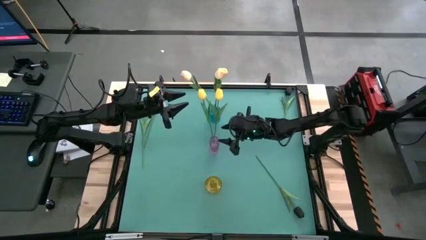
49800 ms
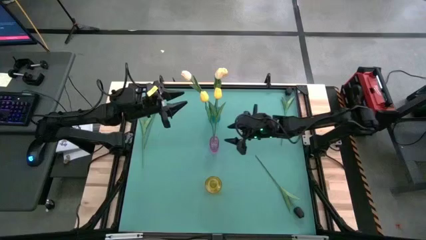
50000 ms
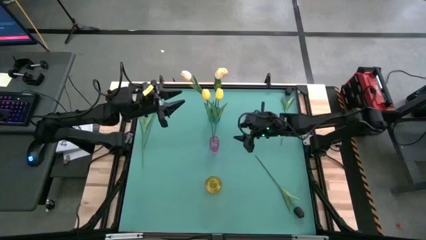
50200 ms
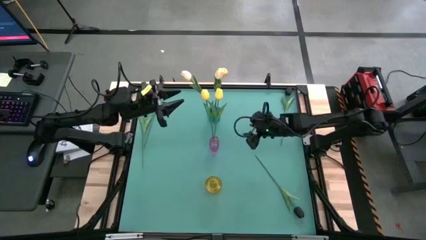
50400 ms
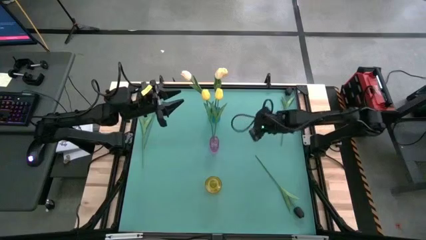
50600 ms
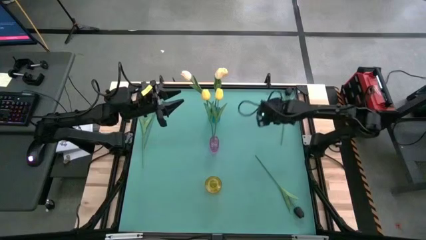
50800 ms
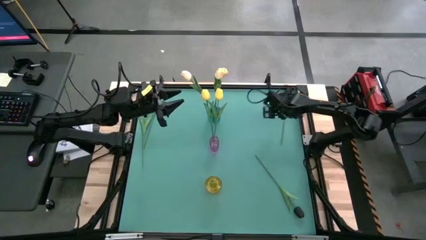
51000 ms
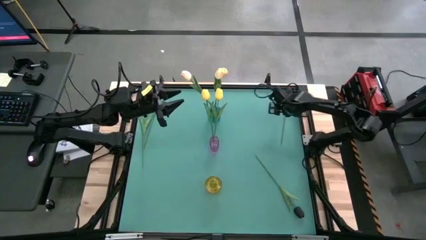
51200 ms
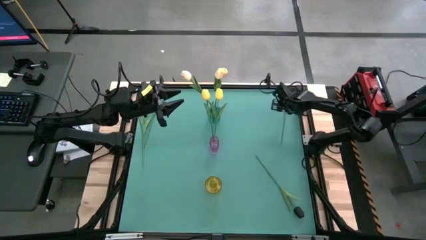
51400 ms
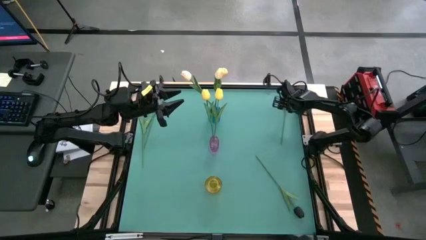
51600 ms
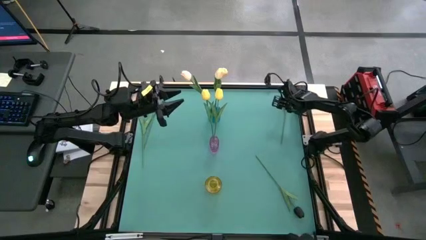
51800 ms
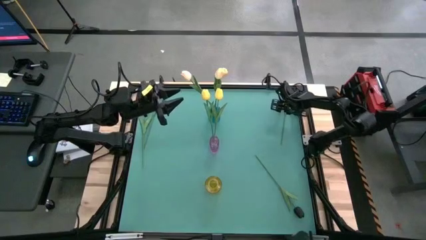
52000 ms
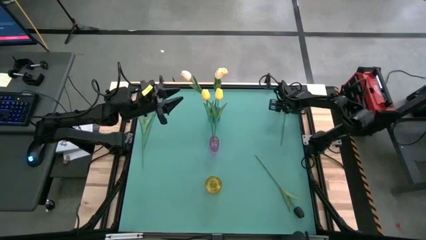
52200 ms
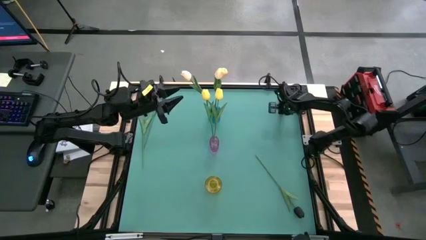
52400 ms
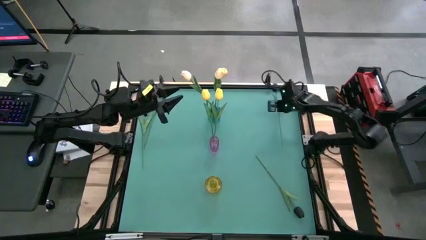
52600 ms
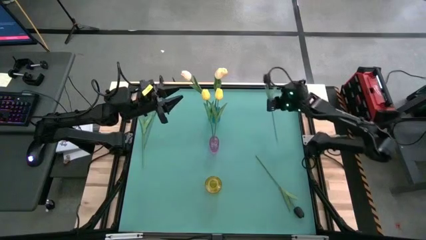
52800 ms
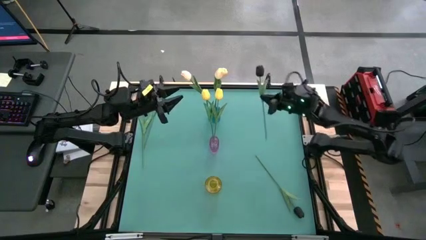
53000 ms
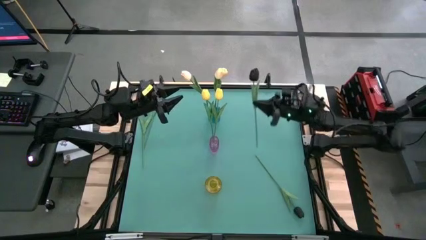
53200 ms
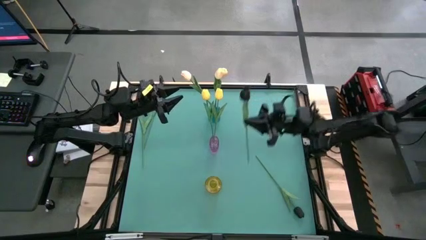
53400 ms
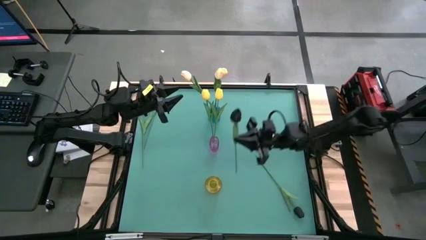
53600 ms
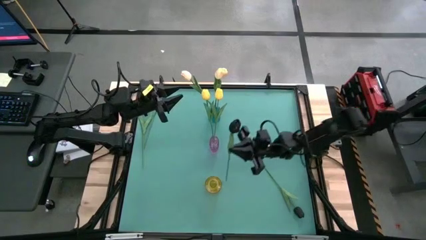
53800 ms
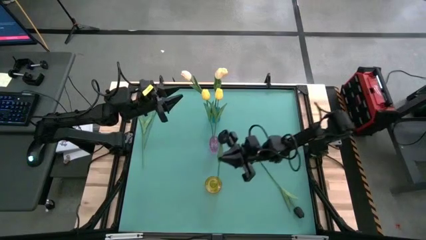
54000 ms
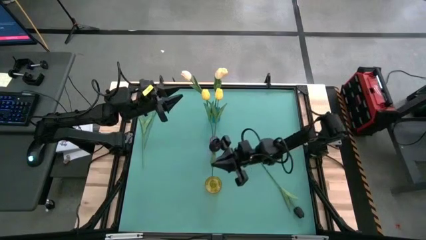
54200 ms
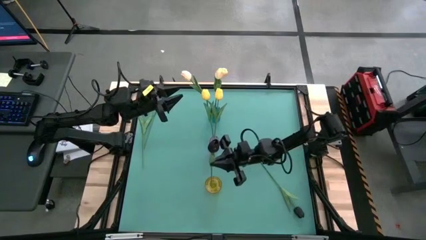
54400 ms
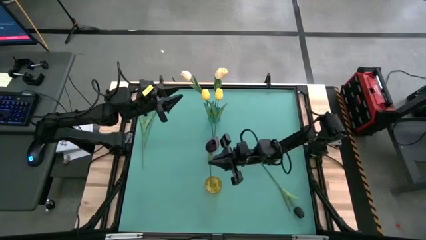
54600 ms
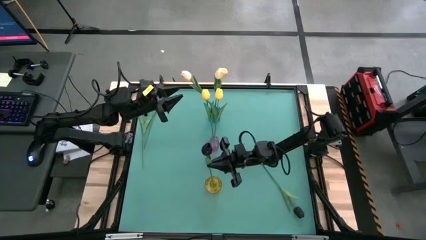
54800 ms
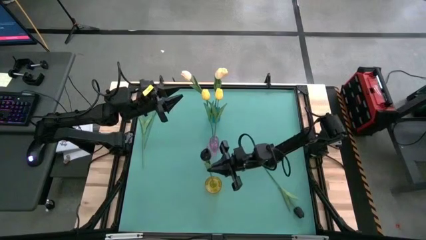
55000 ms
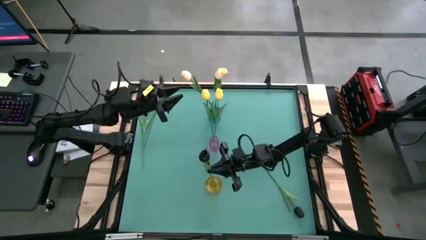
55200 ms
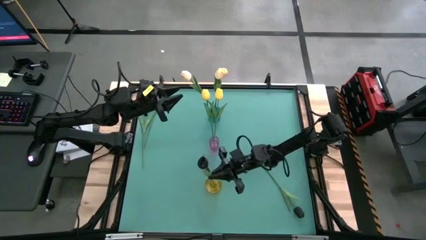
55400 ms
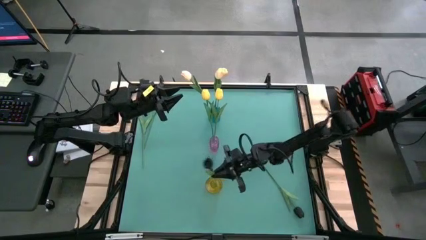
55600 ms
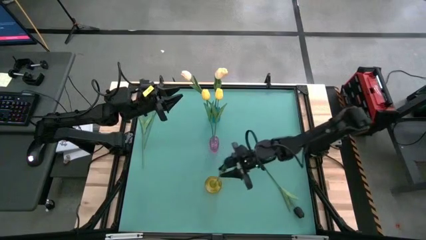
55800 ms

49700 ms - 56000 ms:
Task: Sort flowers into vase by color
Put the top right black flower into the yellow vase

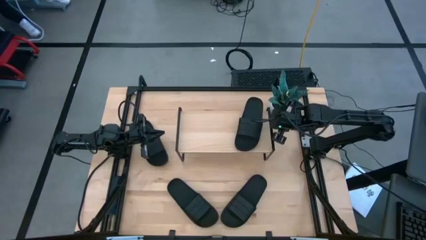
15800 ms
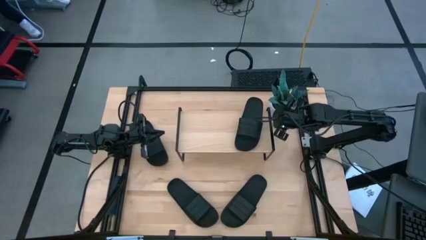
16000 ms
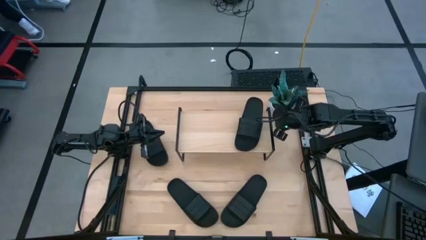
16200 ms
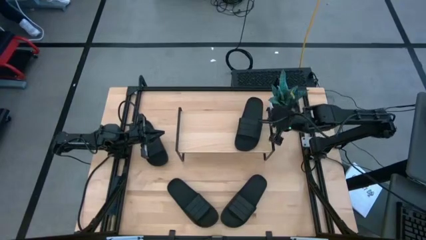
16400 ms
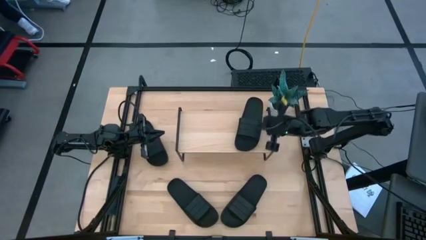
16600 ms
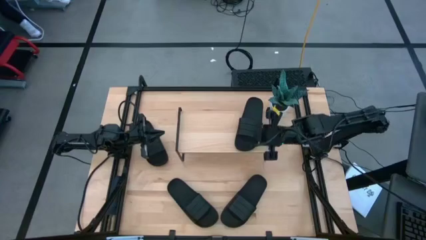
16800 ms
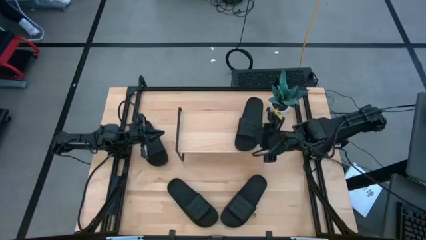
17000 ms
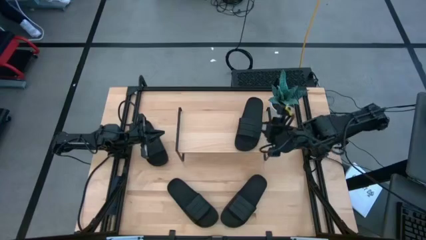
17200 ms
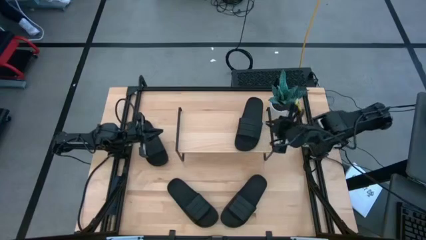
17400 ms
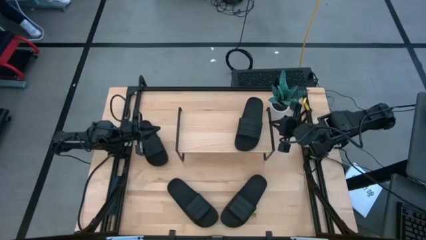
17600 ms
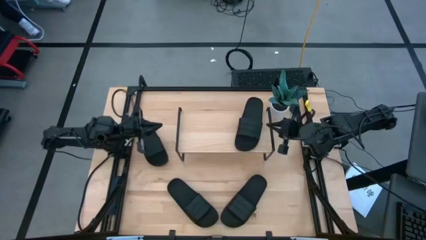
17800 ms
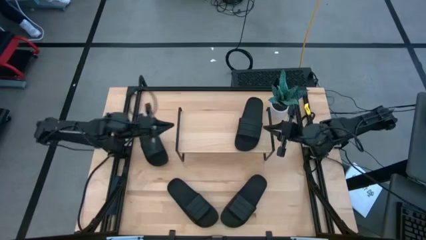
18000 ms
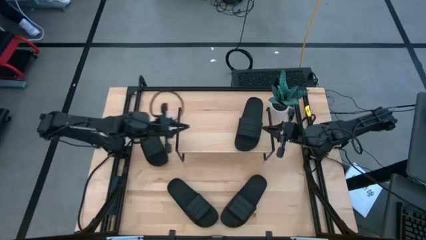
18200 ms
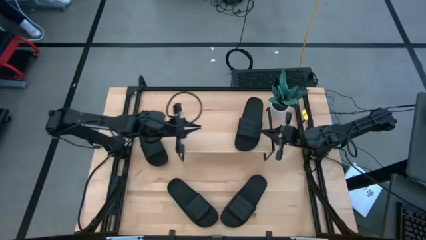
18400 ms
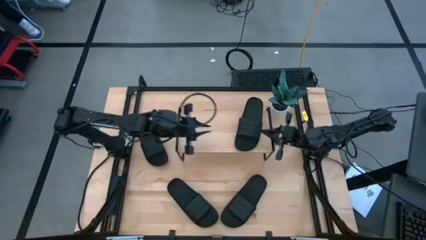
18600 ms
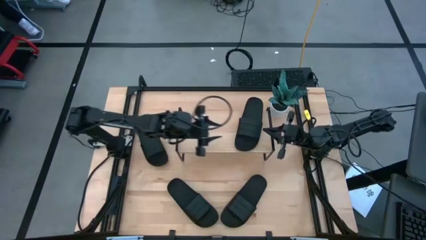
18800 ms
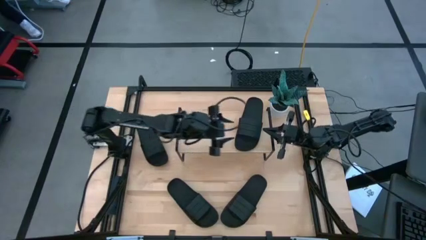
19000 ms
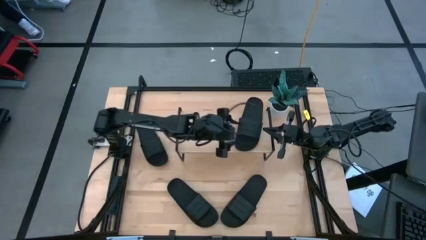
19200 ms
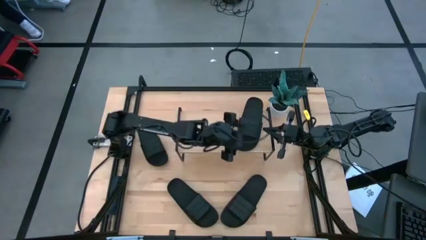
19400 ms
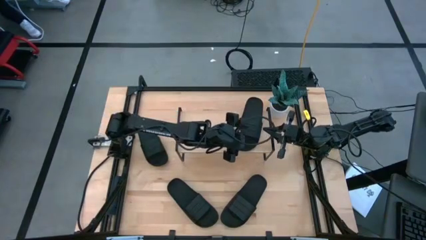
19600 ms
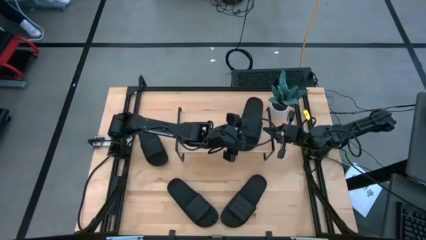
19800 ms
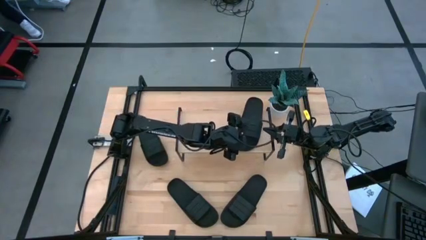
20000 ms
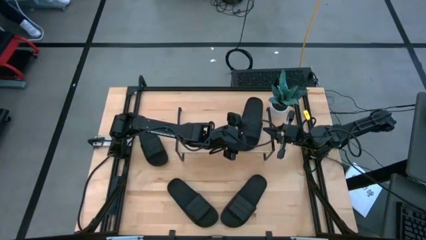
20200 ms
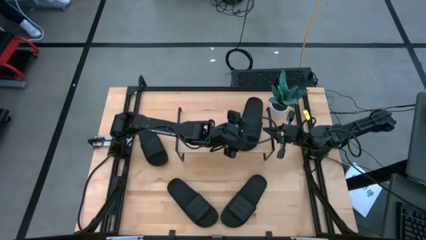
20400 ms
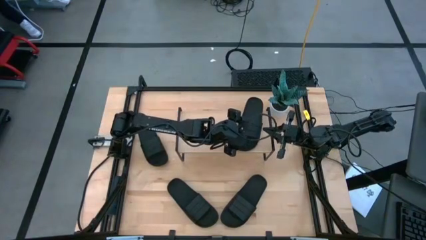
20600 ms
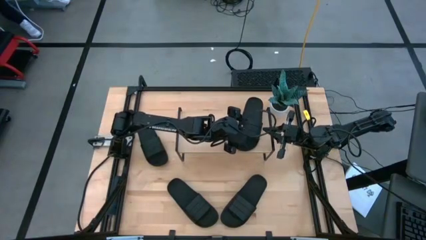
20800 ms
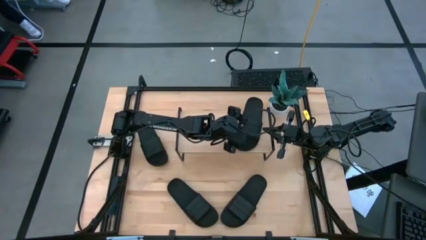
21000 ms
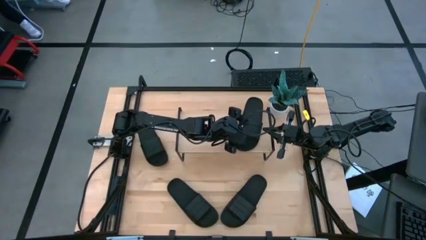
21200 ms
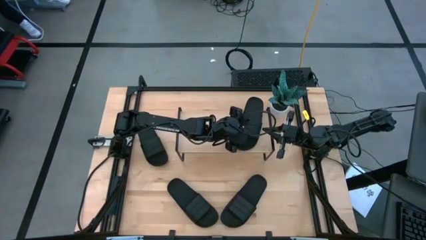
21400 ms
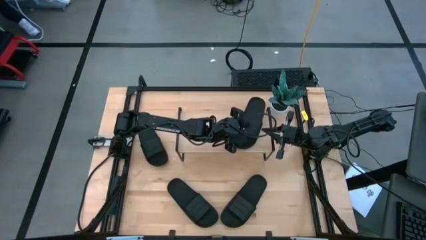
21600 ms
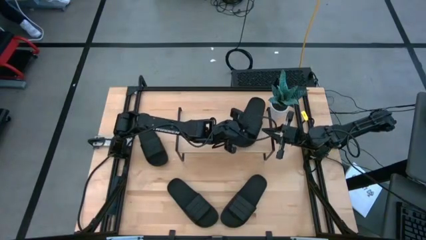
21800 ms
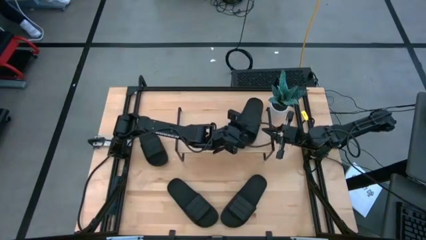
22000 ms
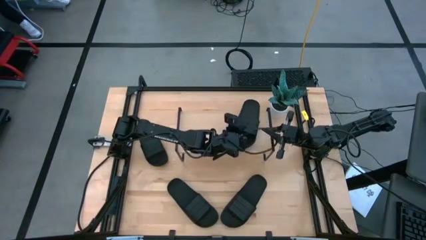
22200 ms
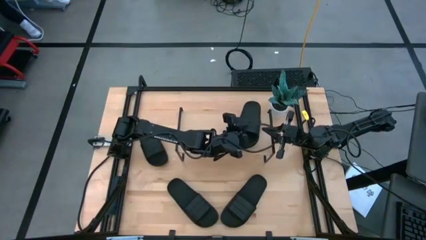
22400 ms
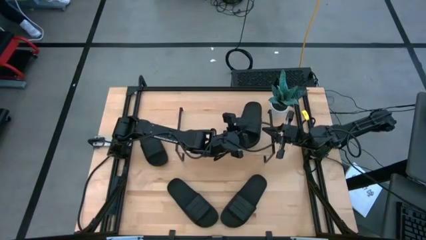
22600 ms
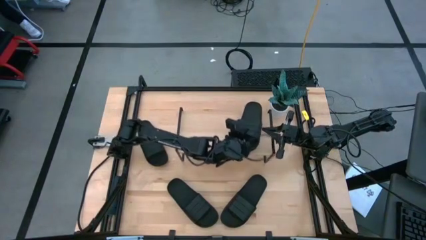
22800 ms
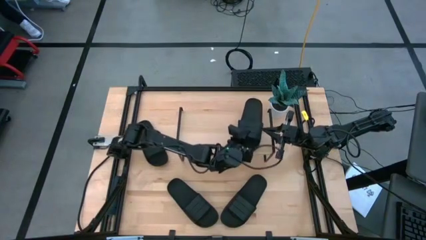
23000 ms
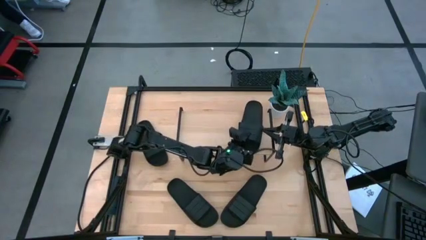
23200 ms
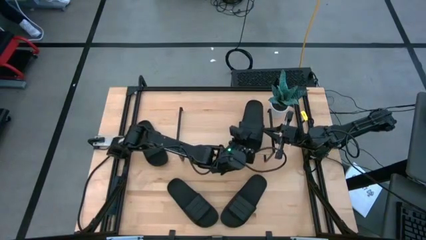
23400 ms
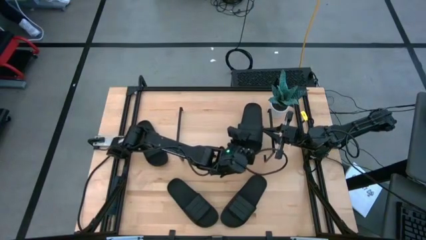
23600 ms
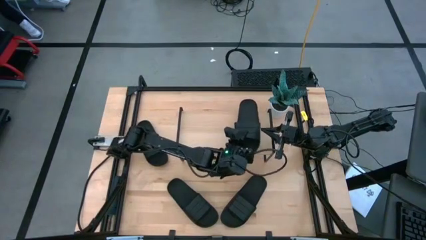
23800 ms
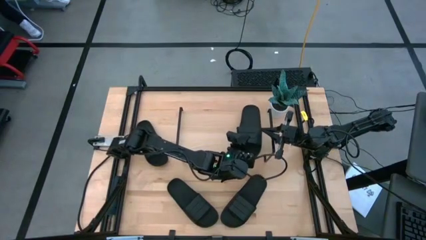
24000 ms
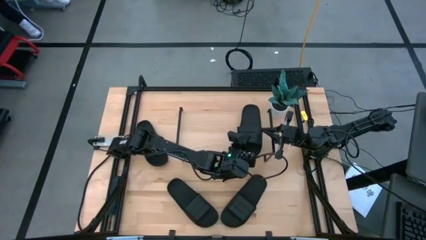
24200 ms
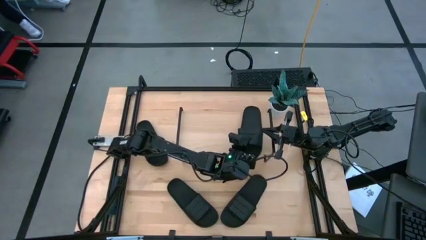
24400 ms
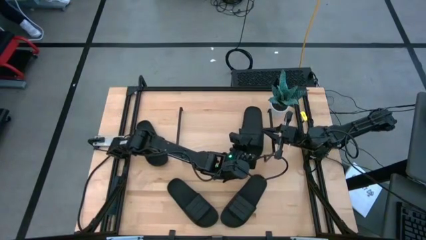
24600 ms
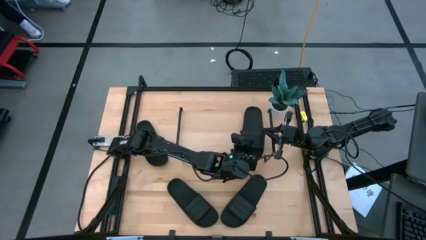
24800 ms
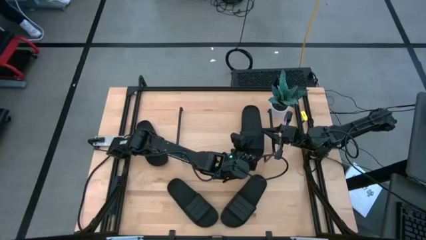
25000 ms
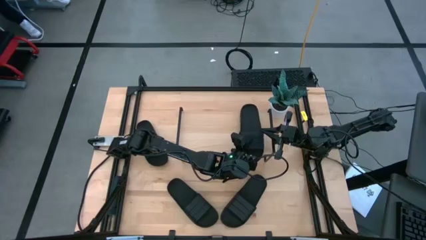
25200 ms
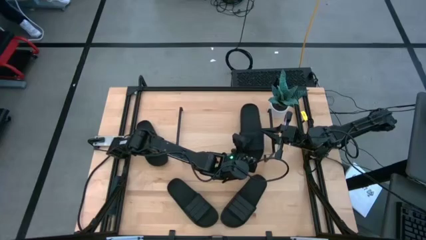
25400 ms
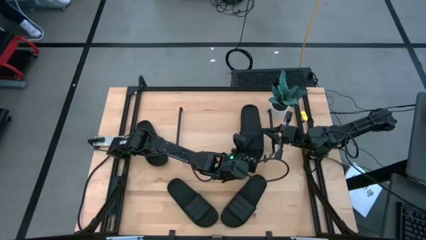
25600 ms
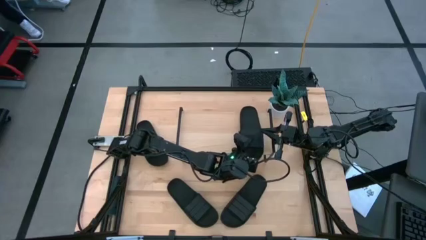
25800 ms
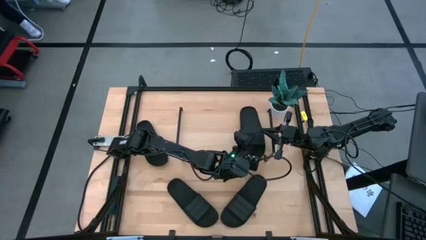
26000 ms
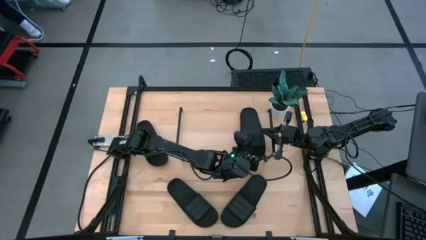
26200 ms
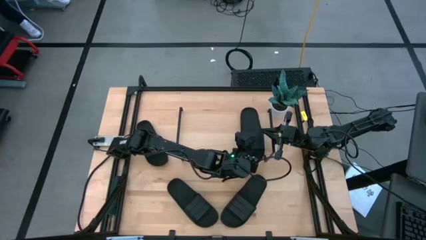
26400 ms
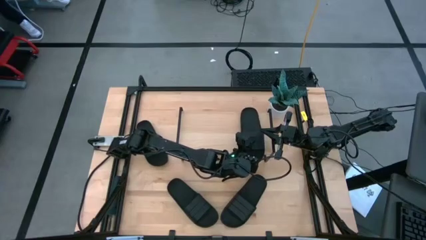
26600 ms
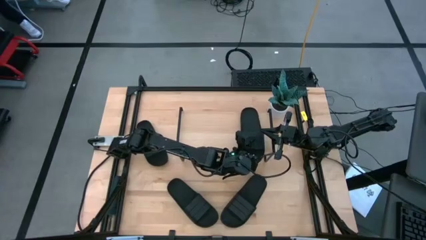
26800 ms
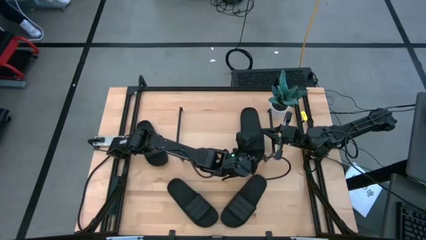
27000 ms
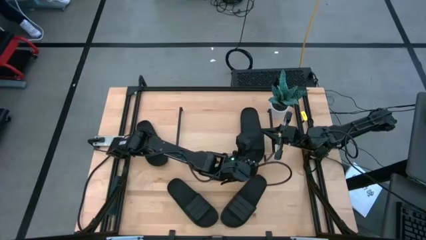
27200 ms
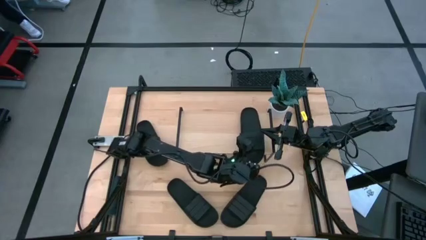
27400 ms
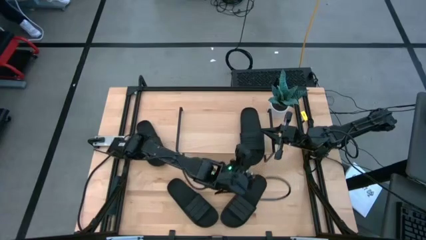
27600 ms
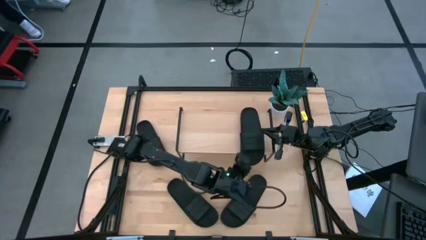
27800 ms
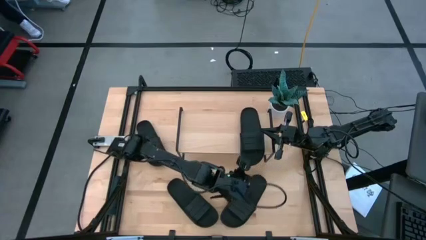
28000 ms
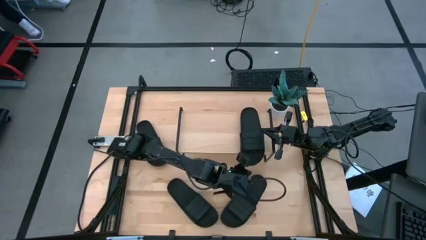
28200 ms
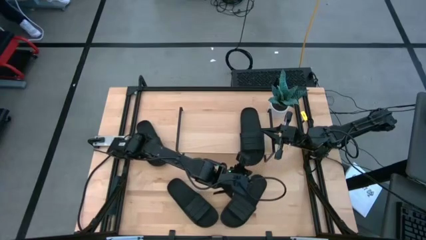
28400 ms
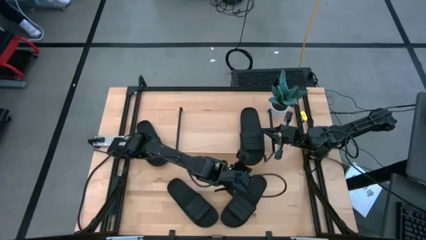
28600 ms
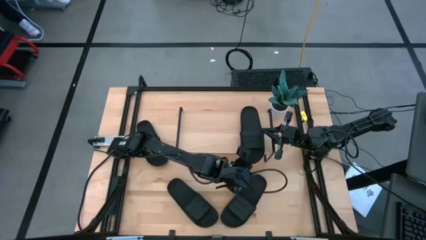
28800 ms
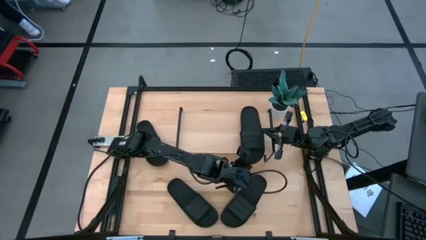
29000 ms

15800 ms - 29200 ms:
Task: Pick and place slides into the shelf
Adjust the black slide on the shelf
